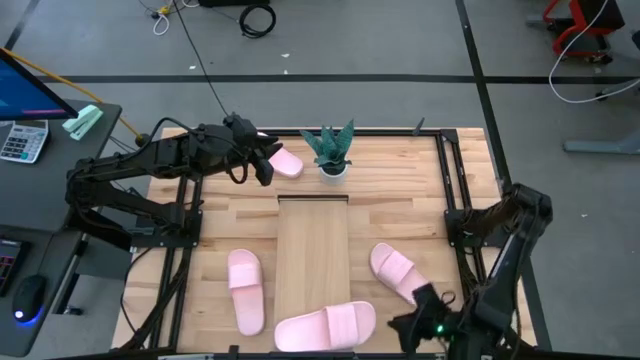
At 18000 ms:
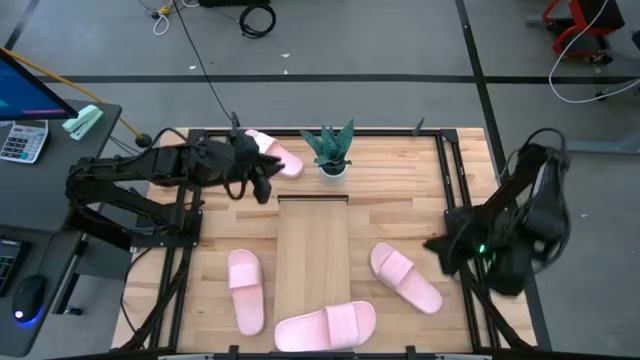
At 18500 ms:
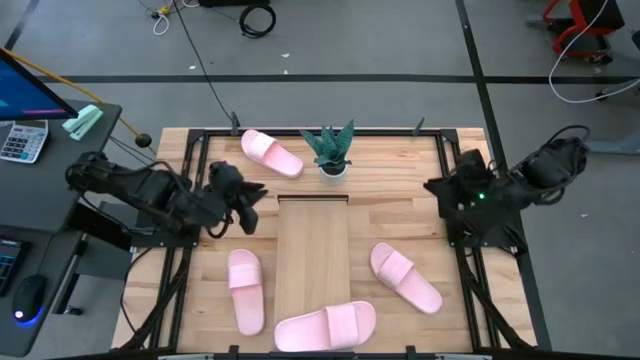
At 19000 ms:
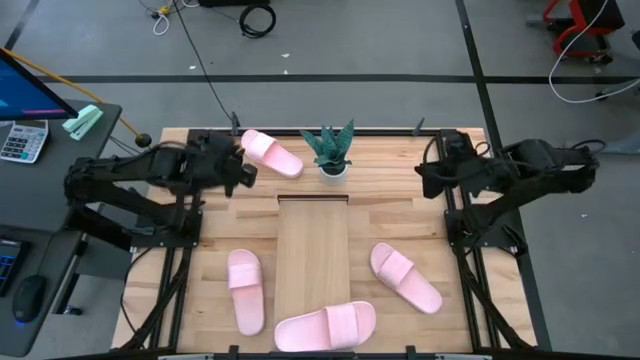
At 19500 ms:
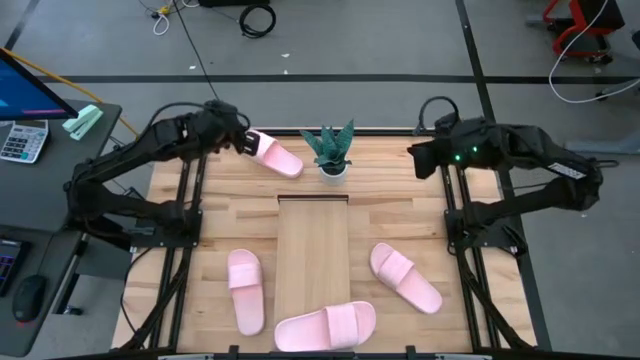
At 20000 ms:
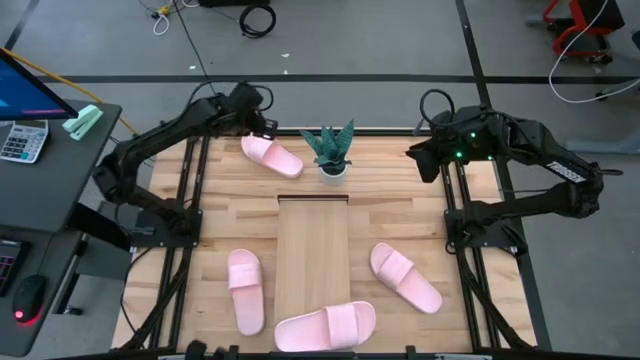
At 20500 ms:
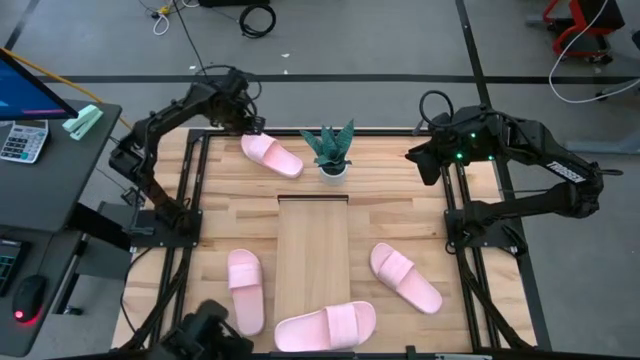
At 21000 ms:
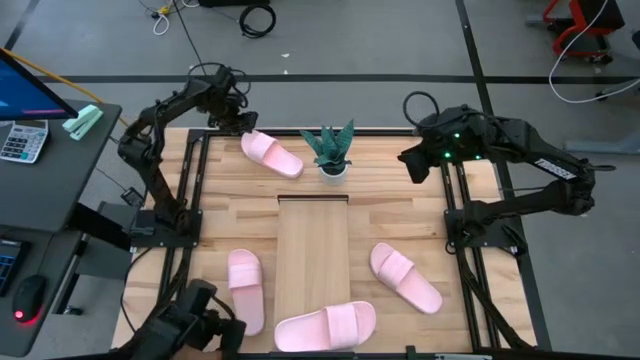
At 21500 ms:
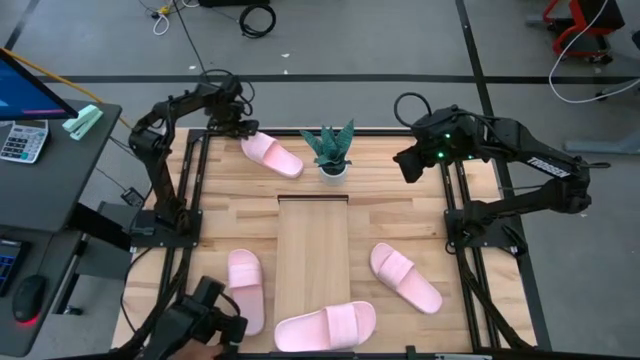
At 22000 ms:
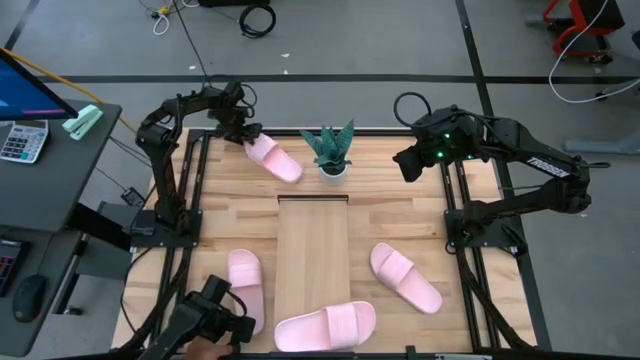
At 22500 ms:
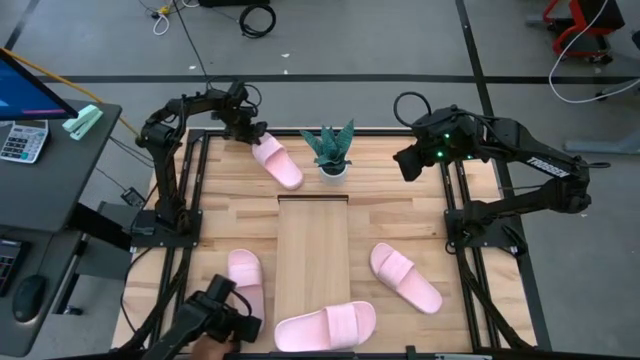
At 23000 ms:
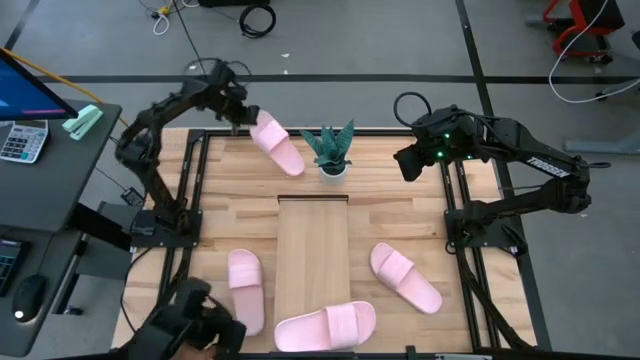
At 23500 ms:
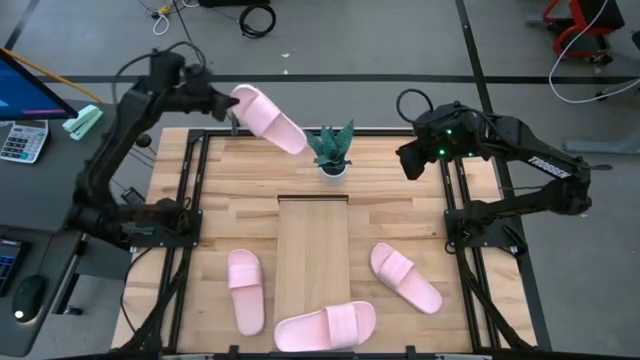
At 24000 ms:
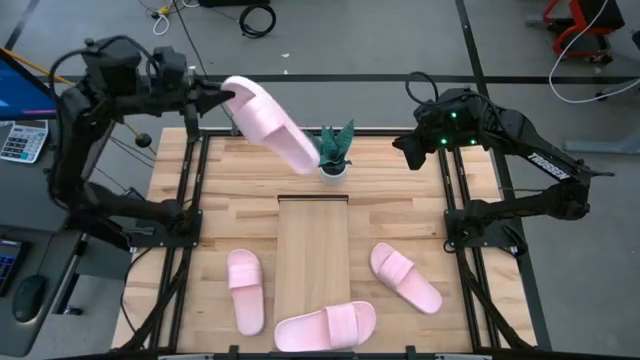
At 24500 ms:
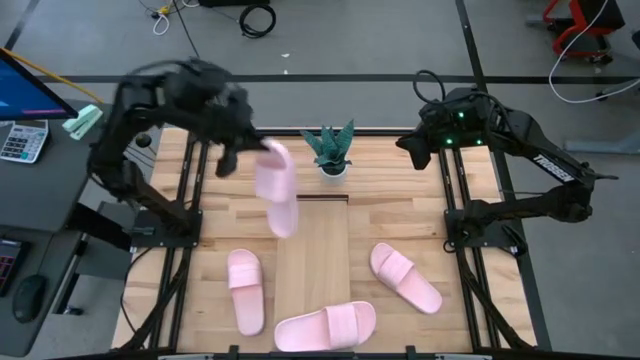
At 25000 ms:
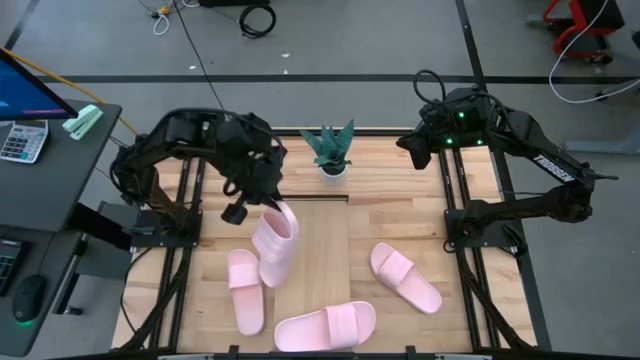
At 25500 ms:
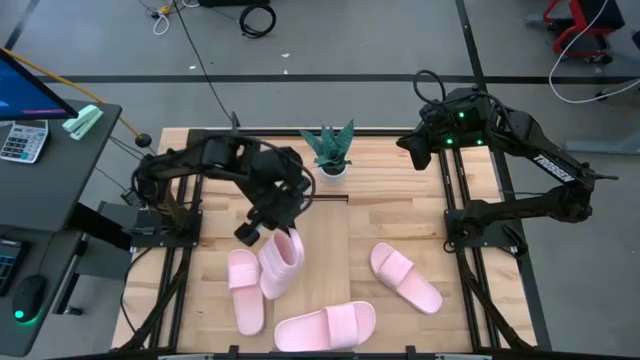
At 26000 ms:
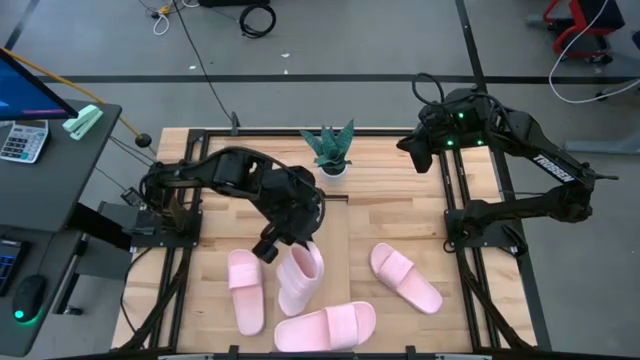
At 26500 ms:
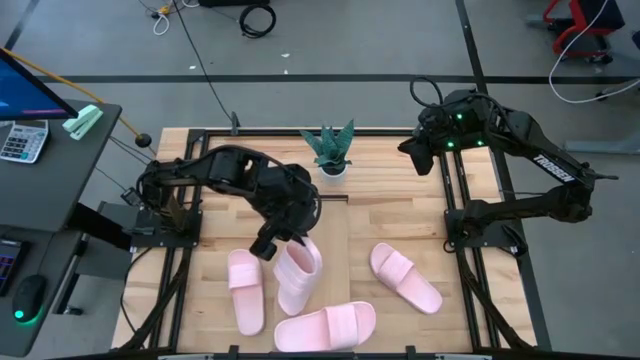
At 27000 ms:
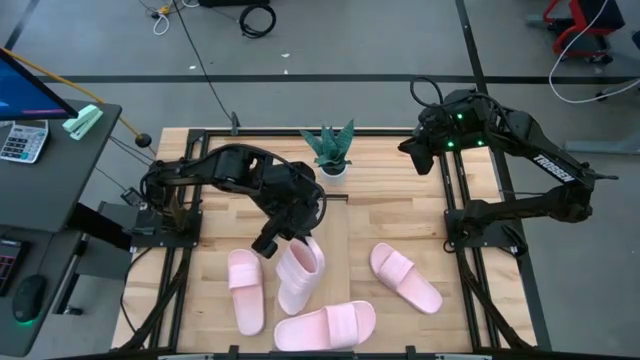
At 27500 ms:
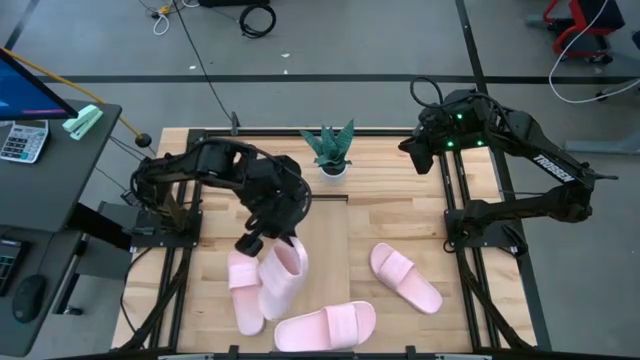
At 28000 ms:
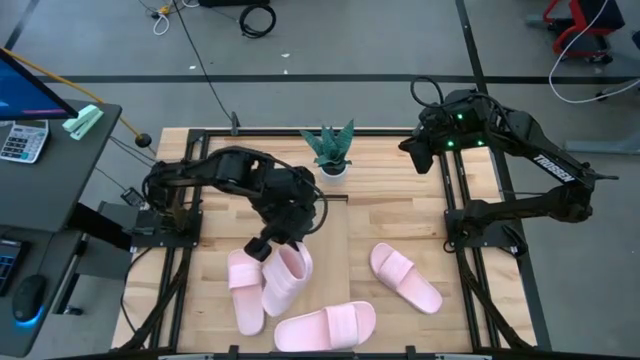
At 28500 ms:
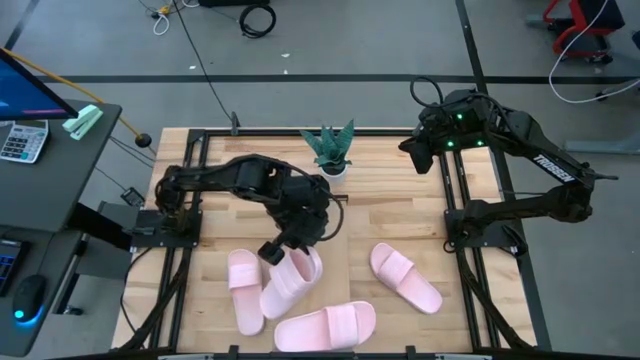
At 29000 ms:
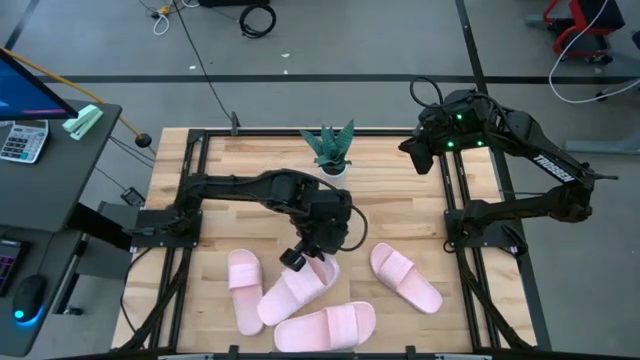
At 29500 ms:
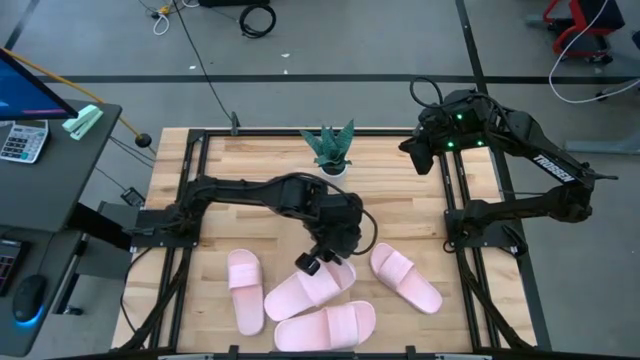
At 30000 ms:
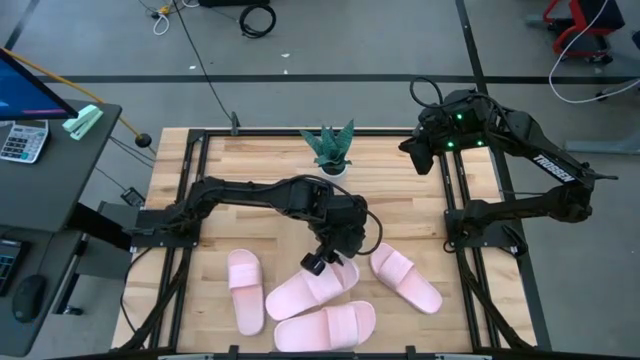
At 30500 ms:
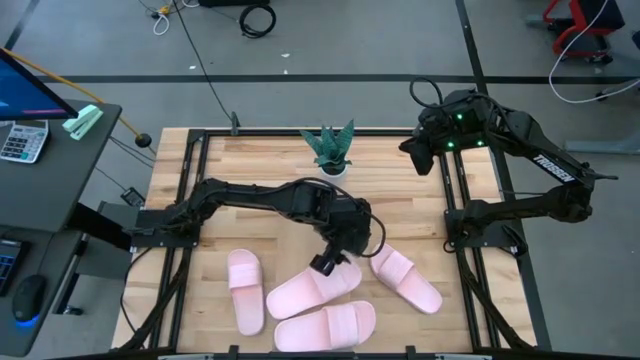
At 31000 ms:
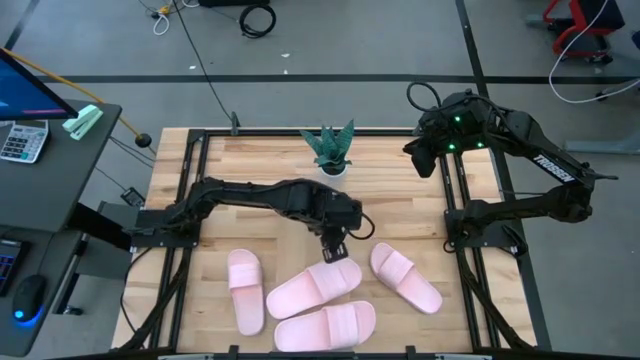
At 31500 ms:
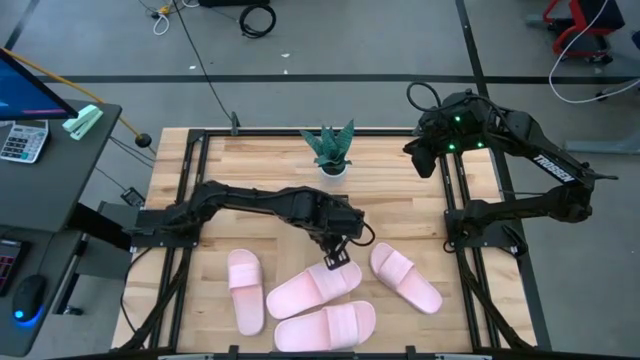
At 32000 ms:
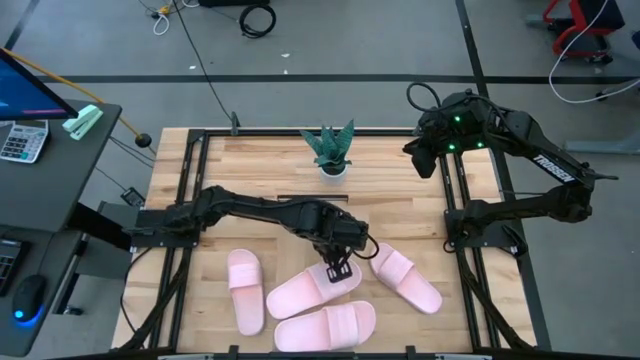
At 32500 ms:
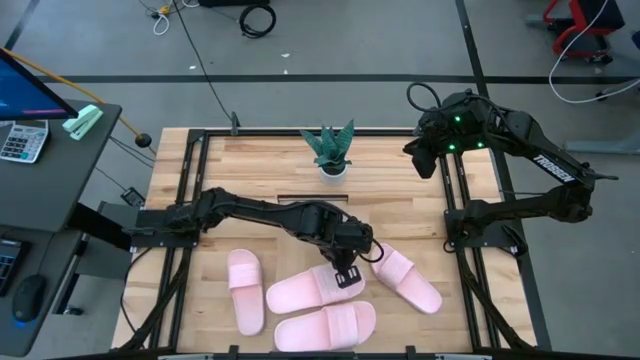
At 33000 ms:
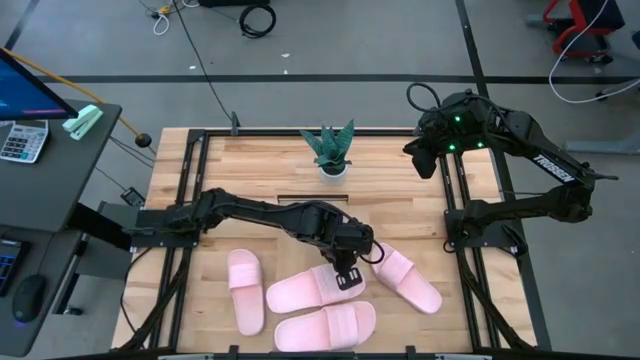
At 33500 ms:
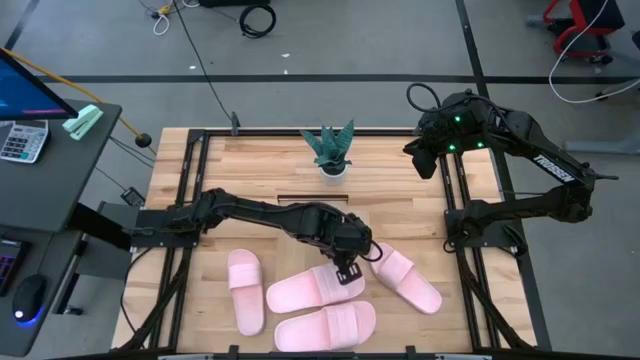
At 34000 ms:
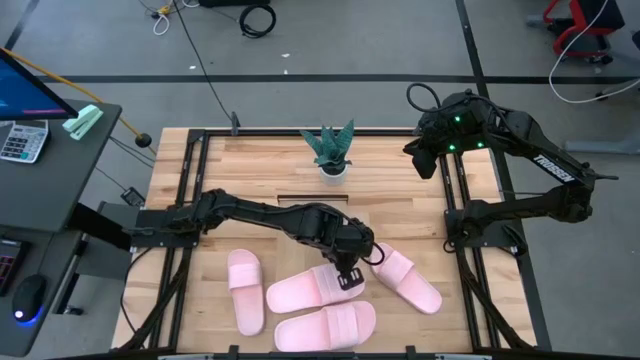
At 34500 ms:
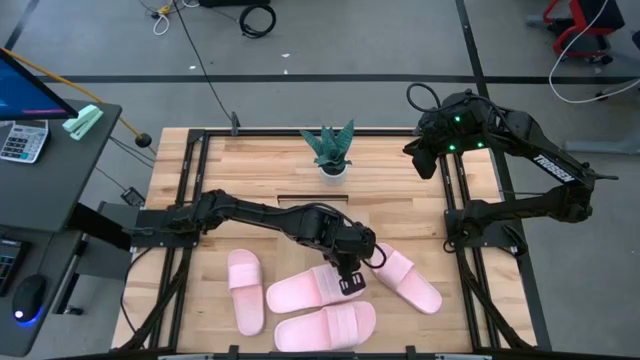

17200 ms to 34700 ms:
Task: Pick and place slides into the shelf
Put the top pink slide on the shelf

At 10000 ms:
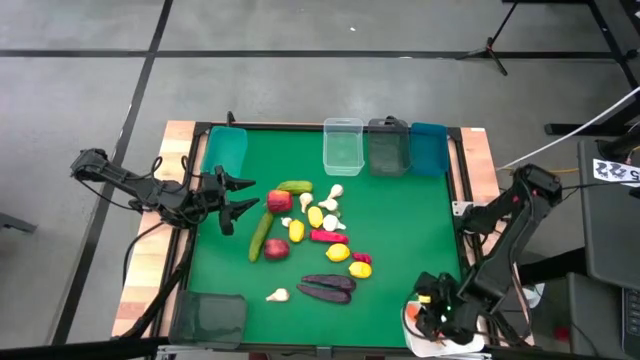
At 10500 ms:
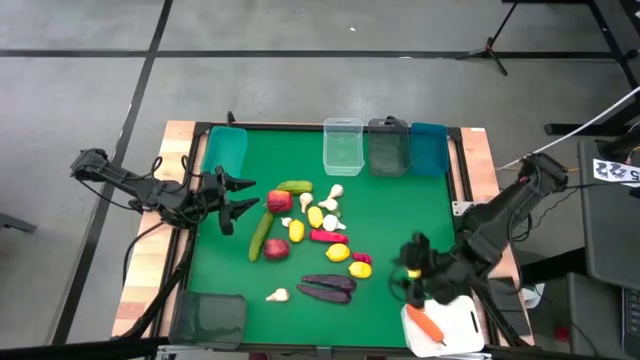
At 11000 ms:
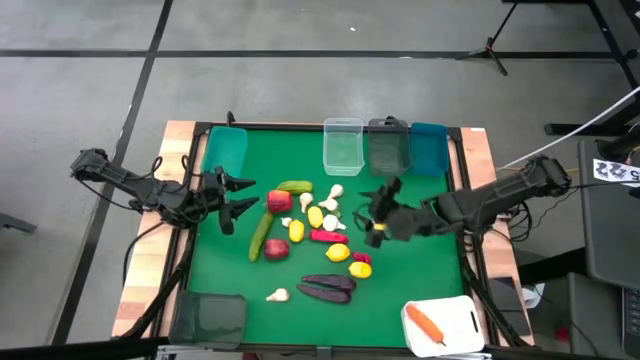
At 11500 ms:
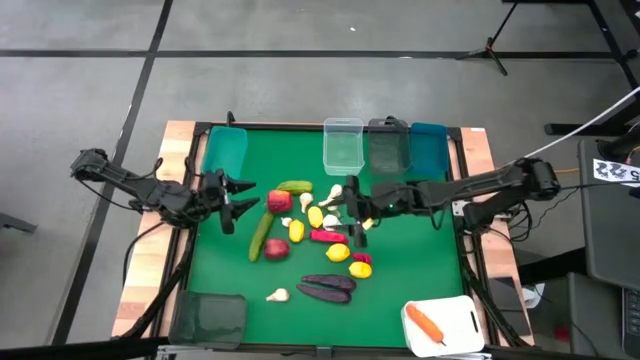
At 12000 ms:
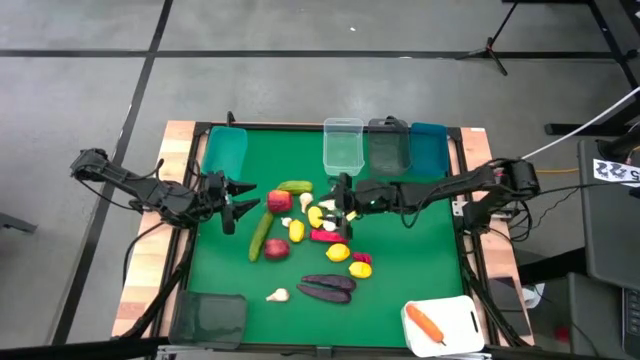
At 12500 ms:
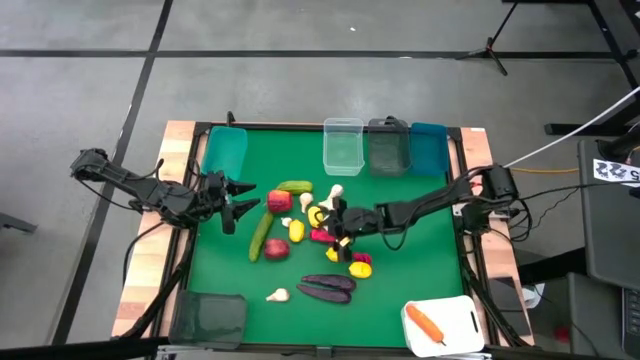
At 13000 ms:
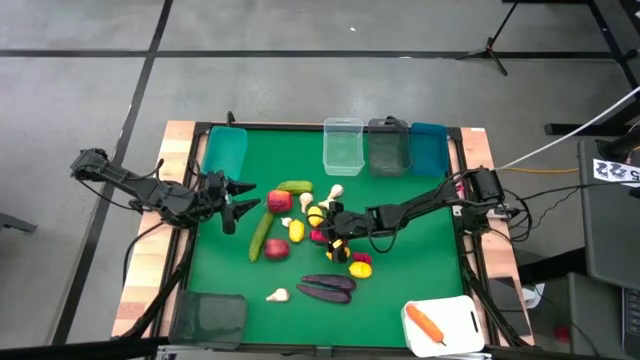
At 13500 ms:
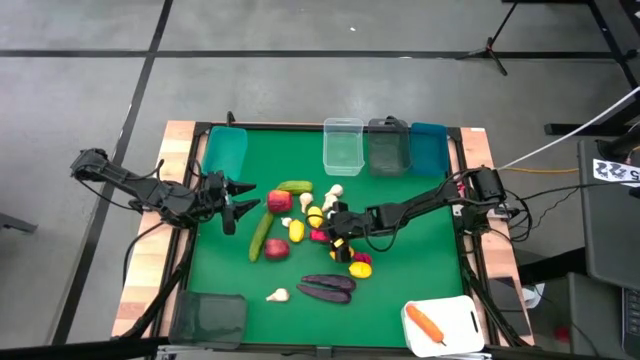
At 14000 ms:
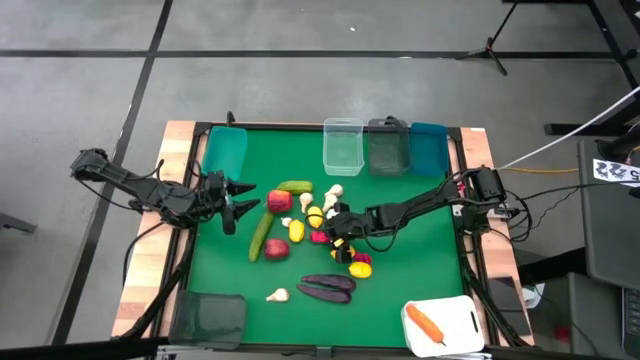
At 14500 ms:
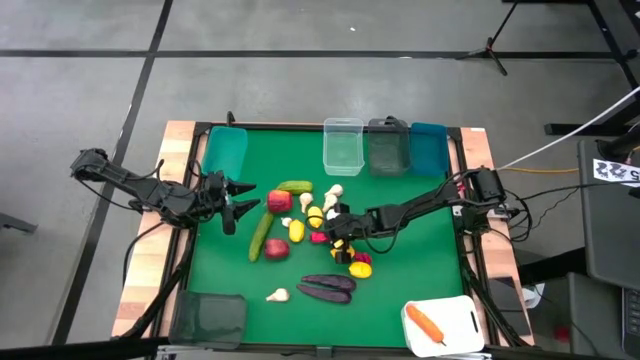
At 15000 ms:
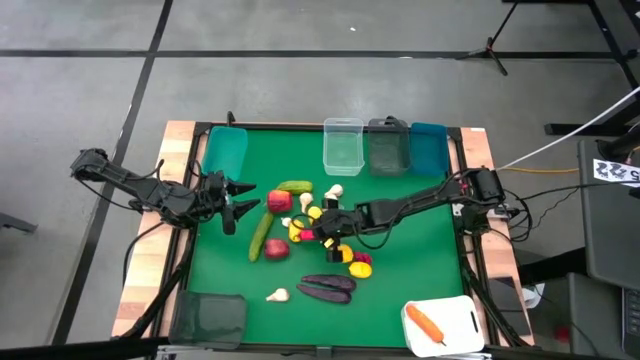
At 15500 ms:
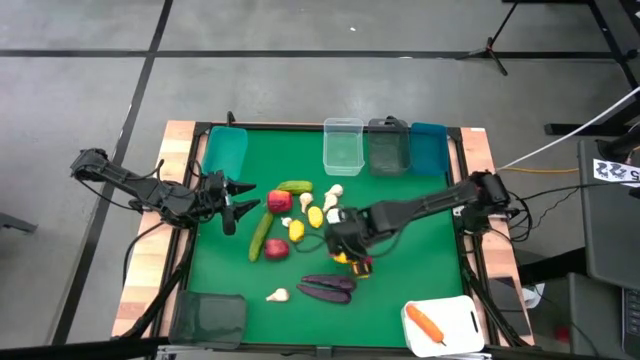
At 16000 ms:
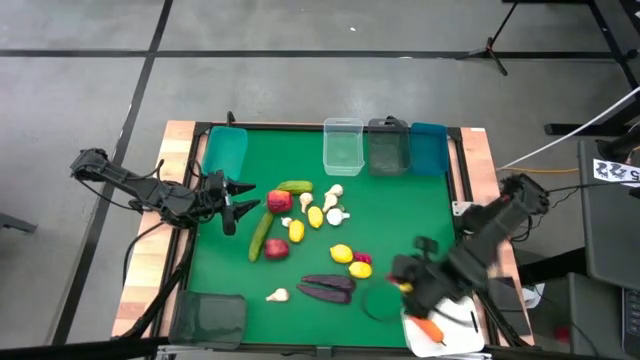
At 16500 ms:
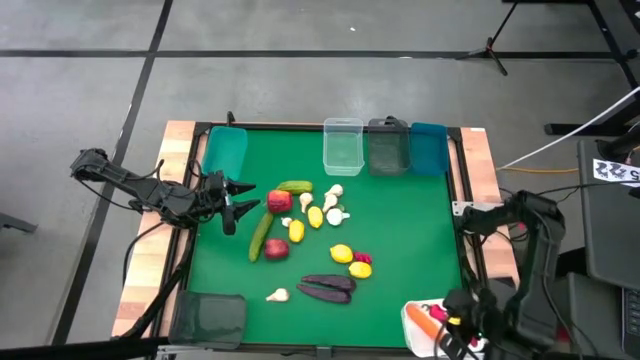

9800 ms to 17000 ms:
Task: Sort produce into baskets
Put the red chili pepper into the white bin
